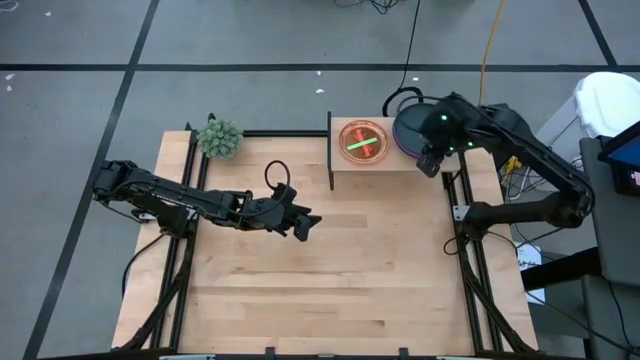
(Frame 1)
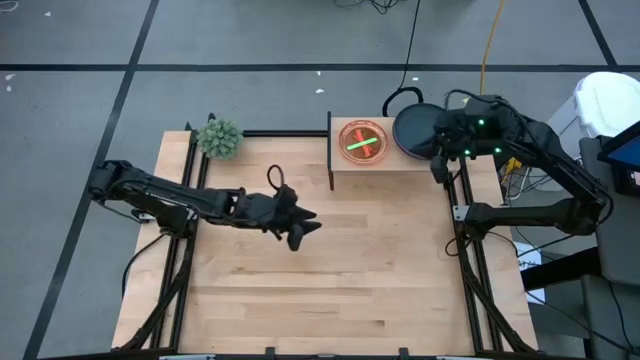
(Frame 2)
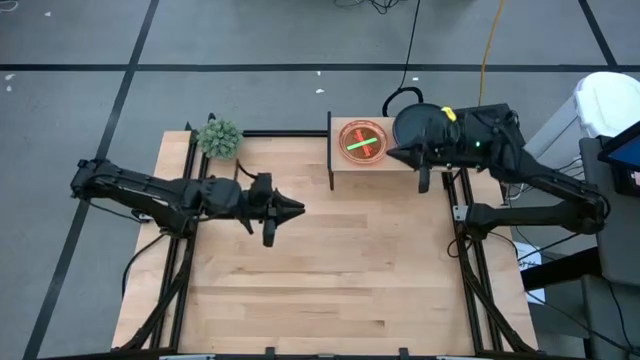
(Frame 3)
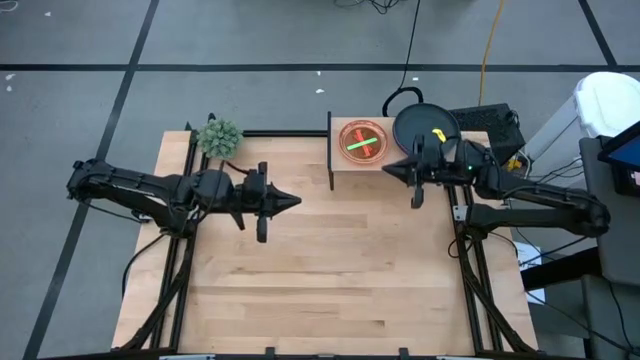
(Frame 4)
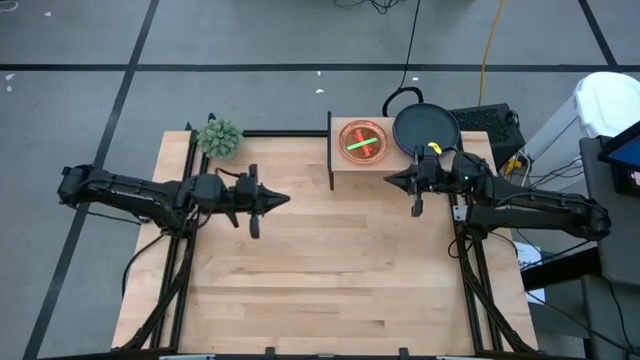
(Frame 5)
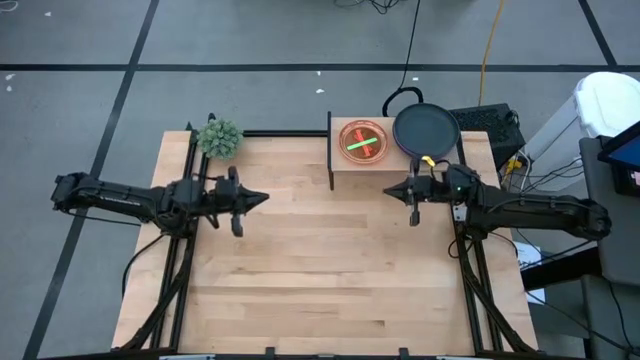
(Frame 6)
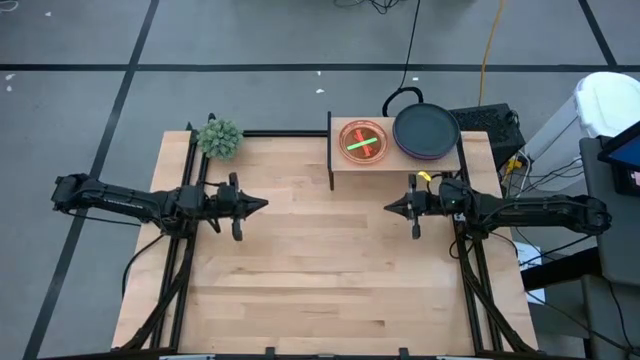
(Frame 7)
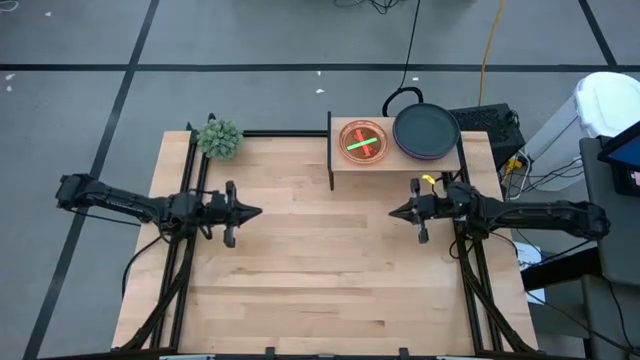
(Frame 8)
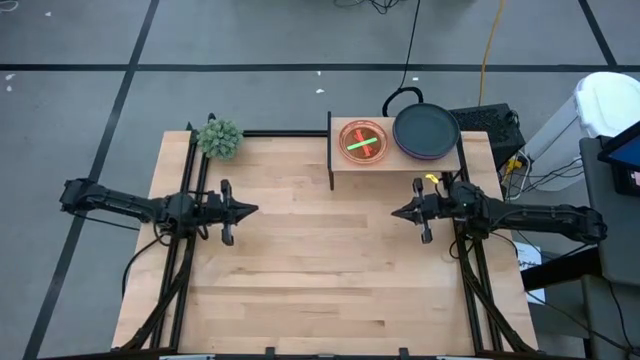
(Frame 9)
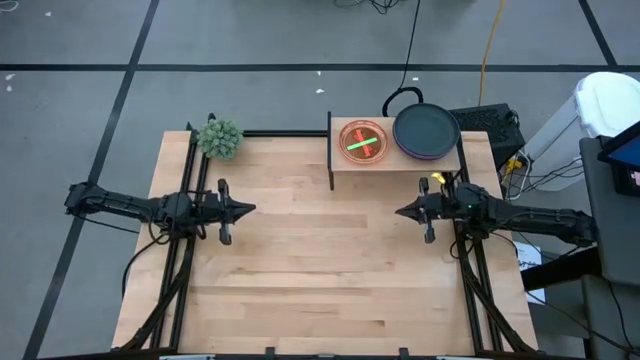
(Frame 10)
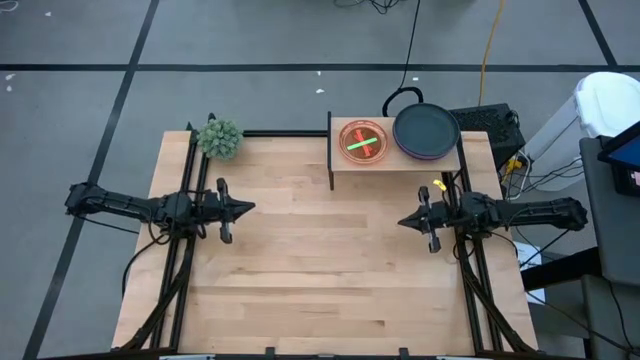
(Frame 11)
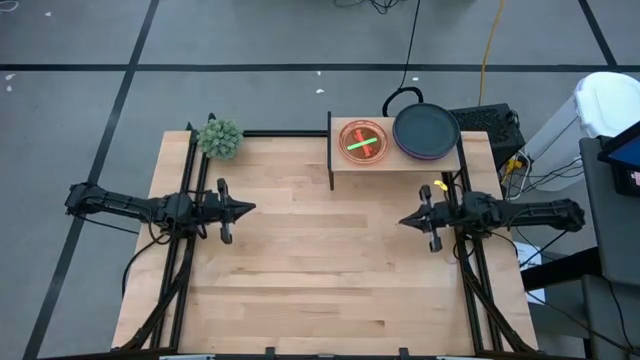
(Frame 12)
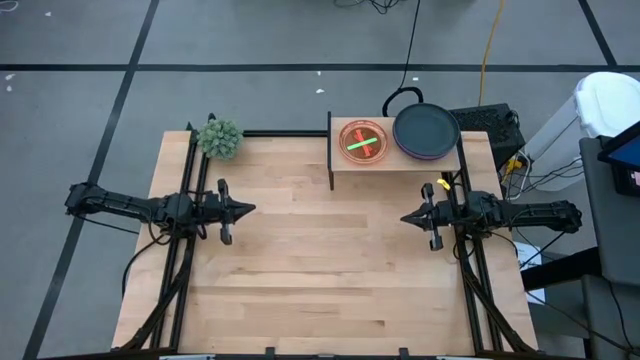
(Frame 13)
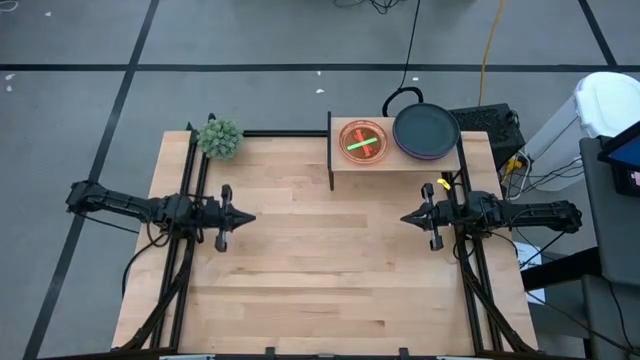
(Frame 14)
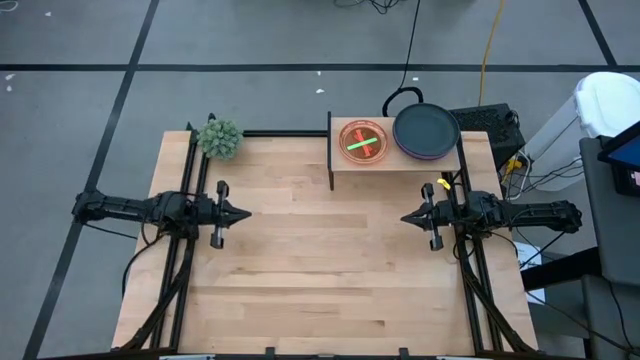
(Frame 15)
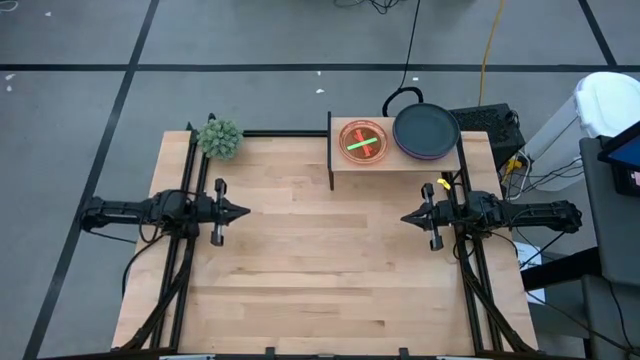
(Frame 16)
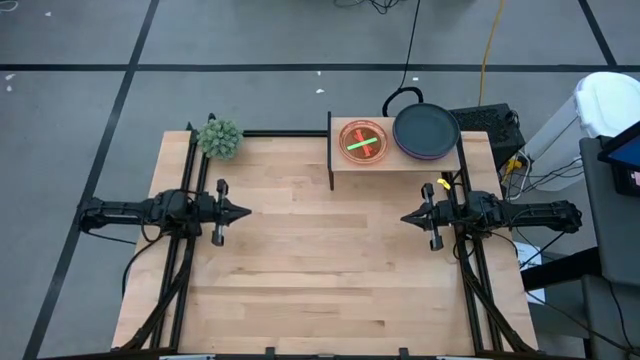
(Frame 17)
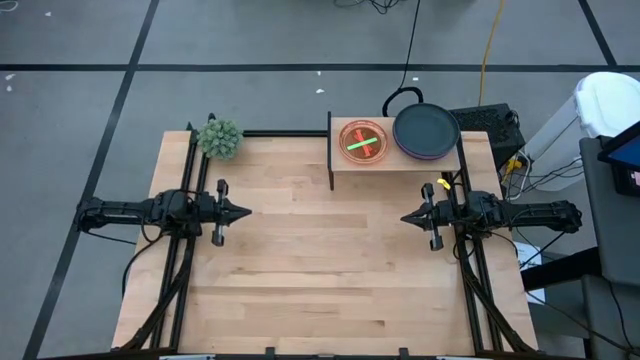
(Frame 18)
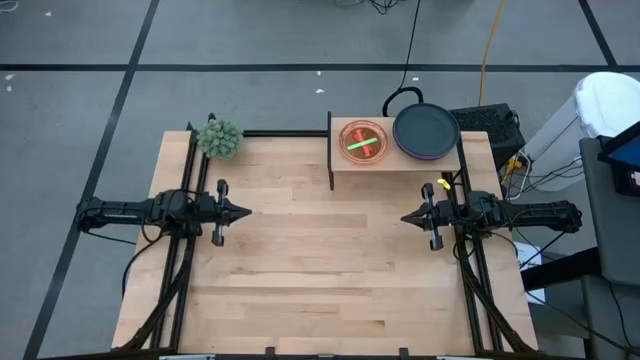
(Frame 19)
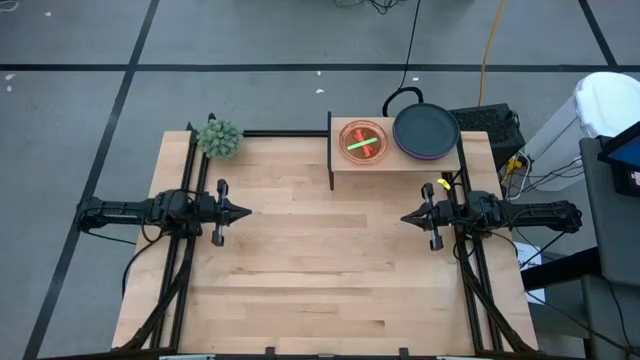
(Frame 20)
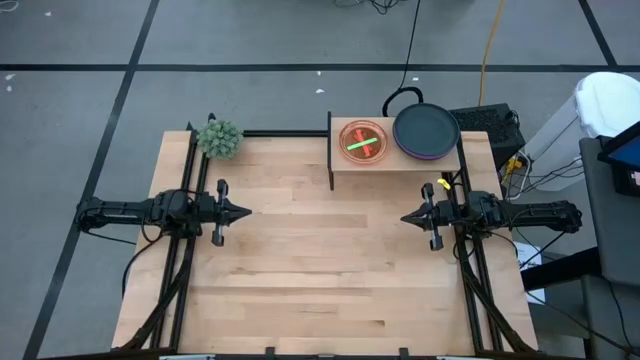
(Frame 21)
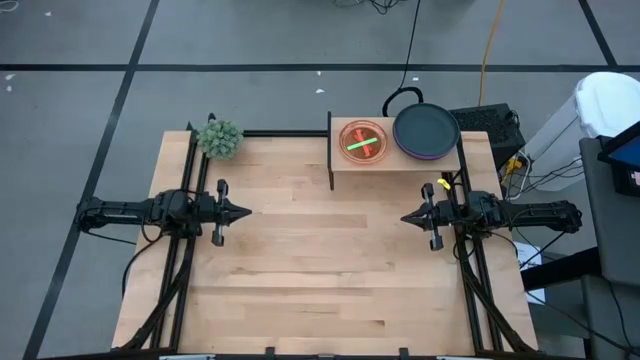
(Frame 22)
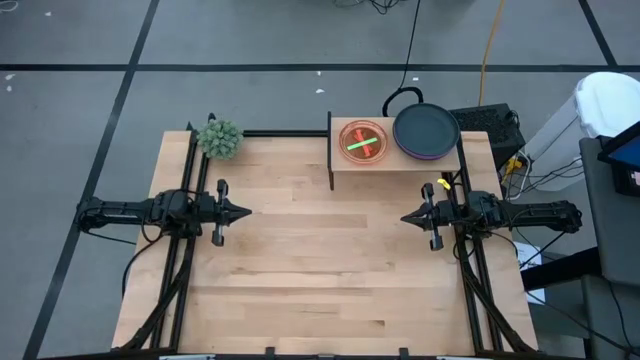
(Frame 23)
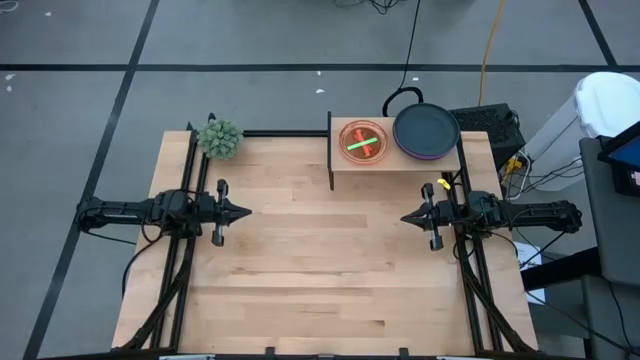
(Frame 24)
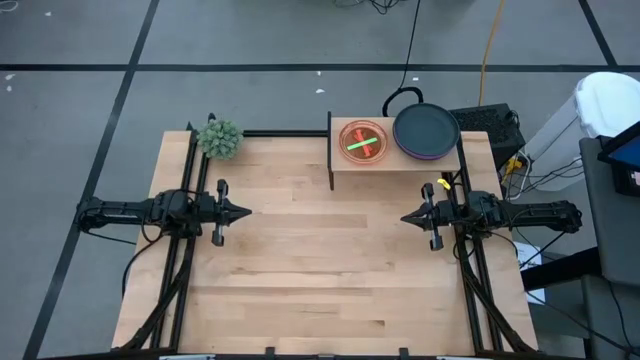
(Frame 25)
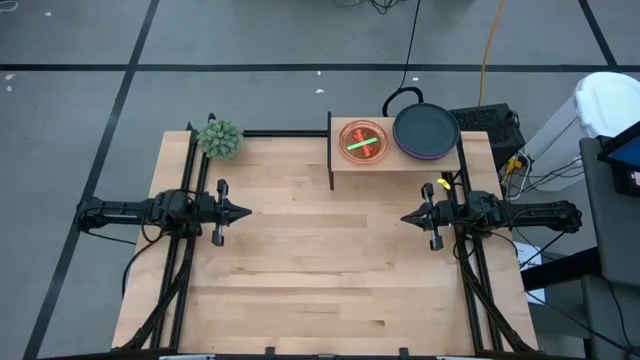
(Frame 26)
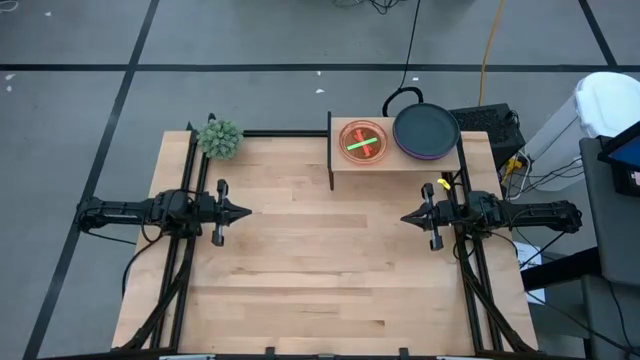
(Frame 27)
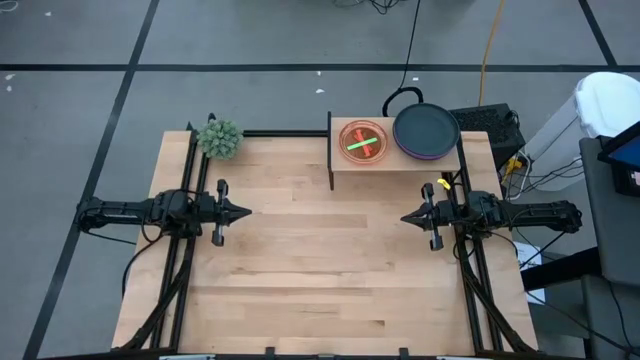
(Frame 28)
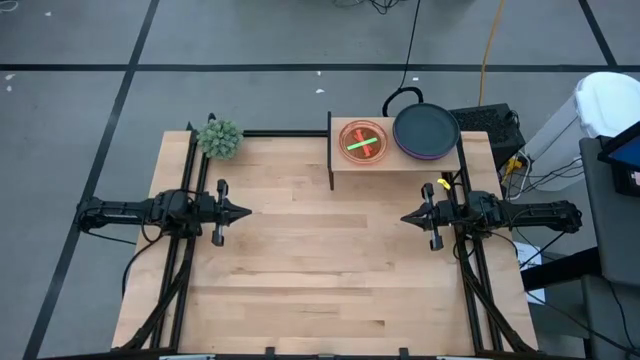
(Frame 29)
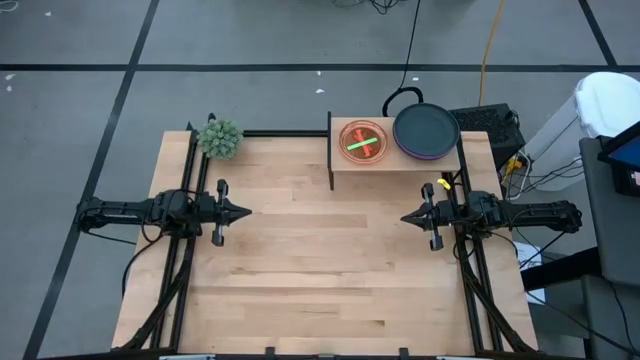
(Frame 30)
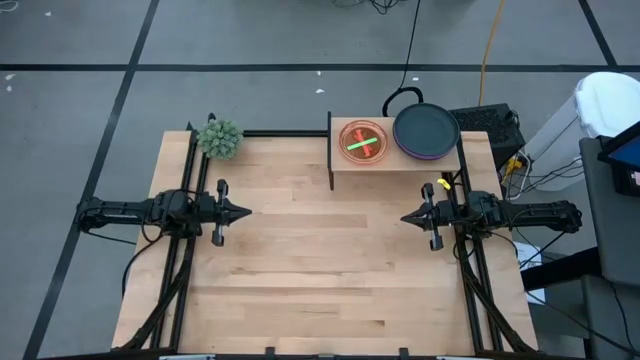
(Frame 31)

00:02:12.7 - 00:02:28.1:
Task: Place and stack plates onto a shelf
Return to Home Position

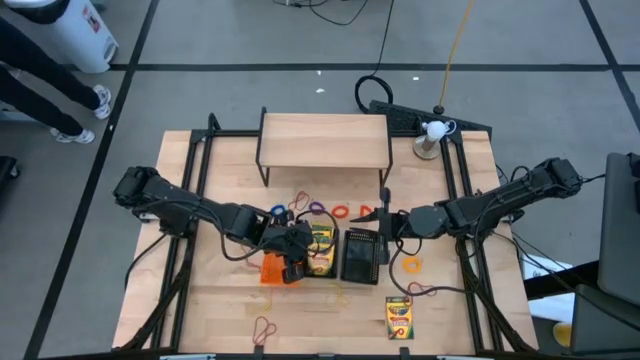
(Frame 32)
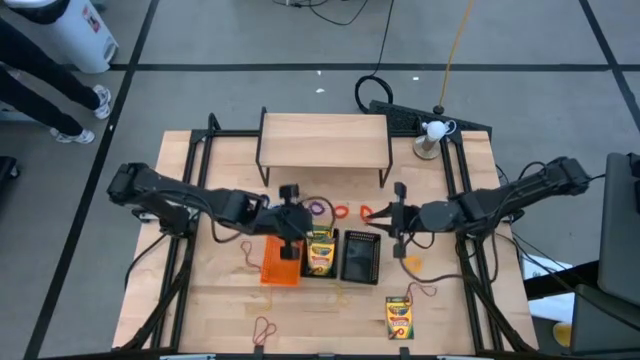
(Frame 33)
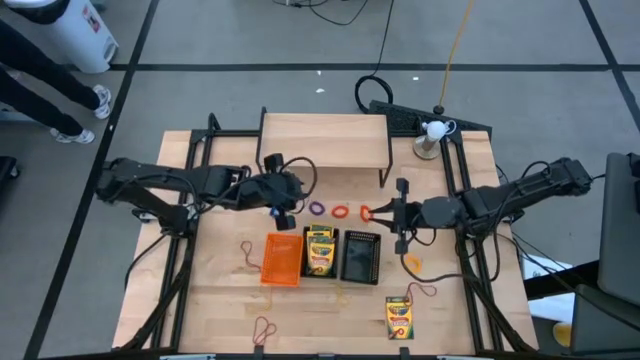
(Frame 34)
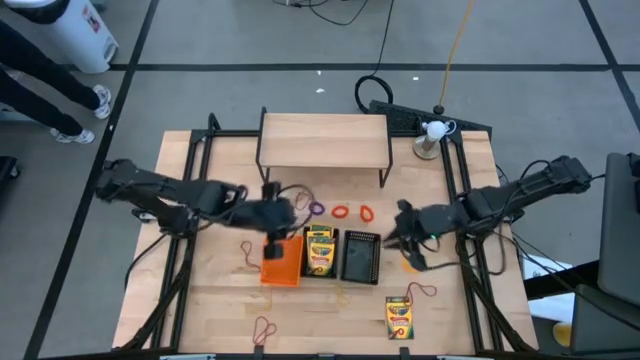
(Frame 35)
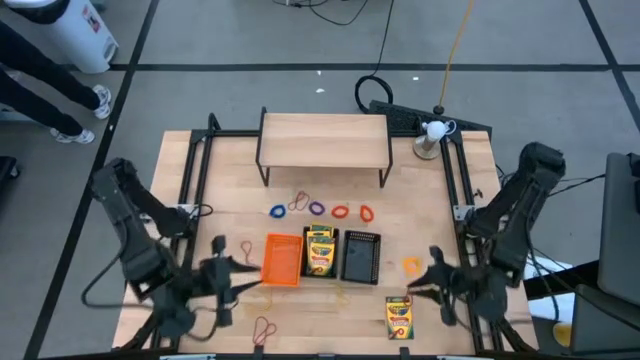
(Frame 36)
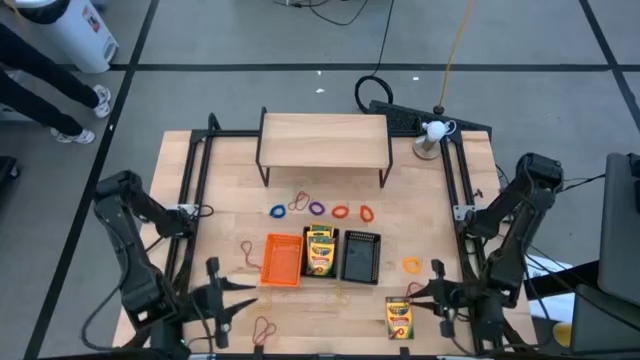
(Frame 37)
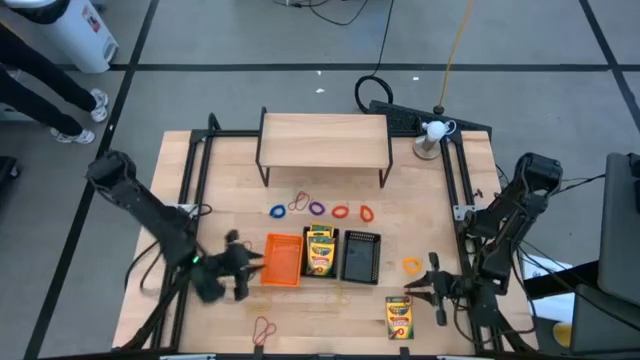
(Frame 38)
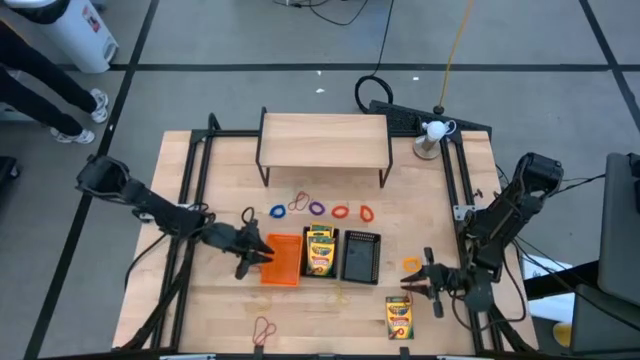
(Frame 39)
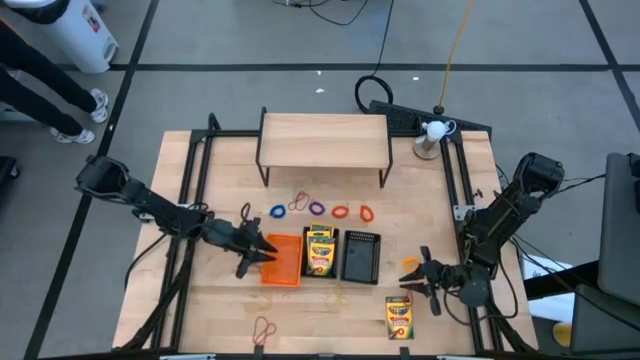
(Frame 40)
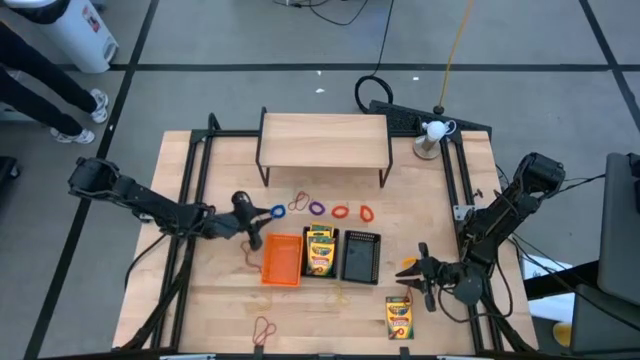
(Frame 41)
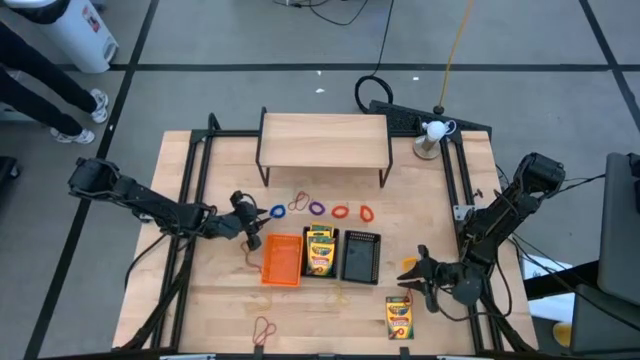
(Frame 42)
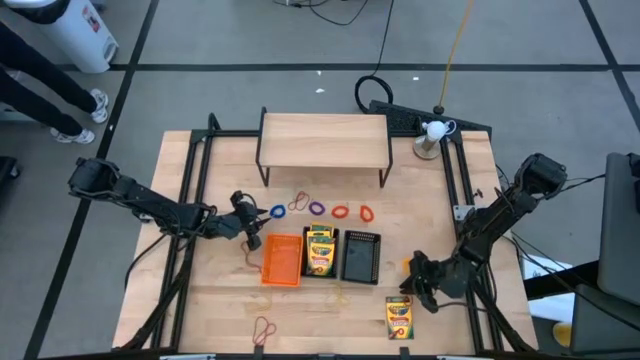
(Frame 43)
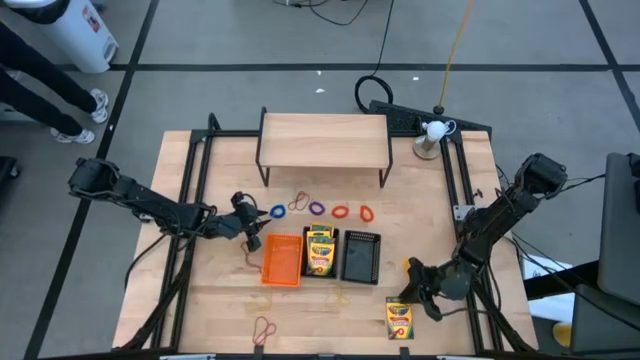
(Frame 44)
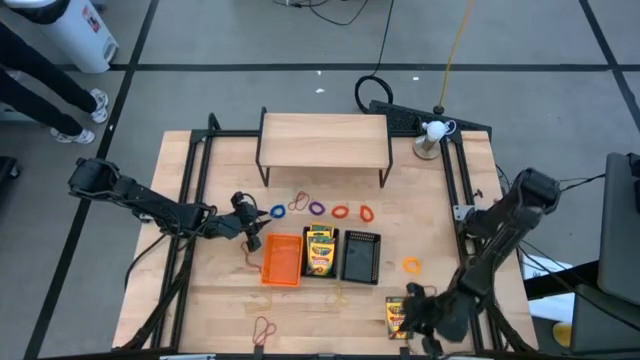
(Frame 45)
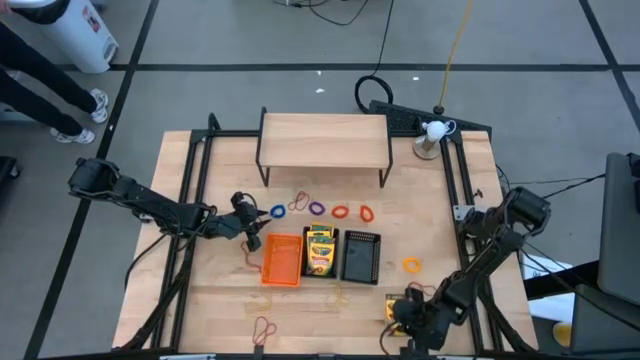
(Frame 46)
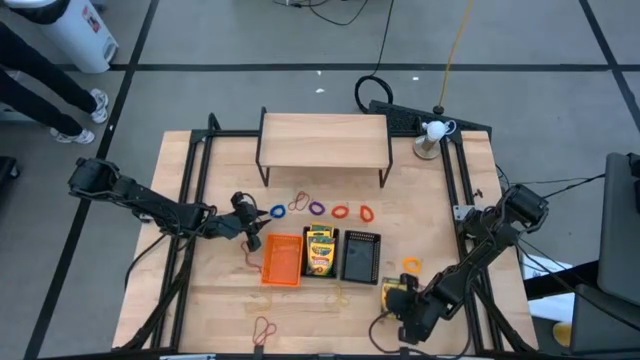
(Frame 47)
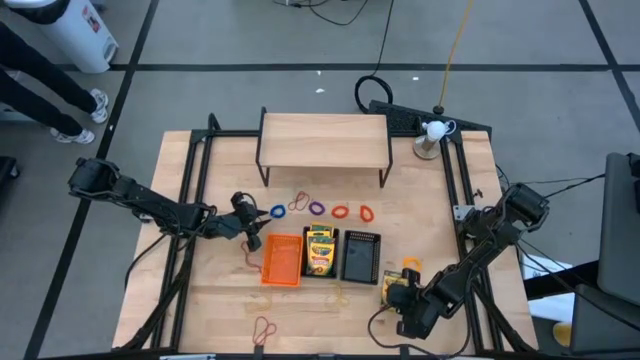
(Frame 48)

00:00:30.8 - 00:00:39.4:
Task: Pick & Place Office Desk Supplies
Adjust the crayon box
